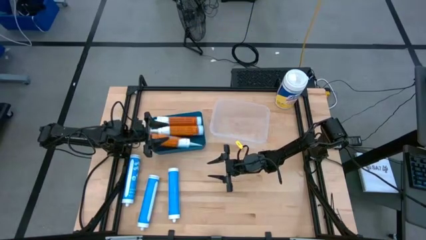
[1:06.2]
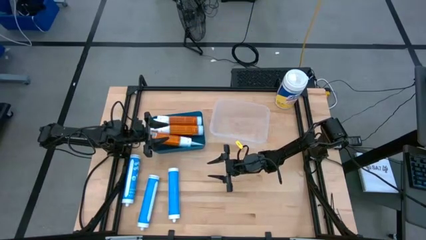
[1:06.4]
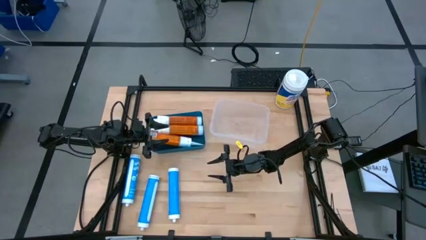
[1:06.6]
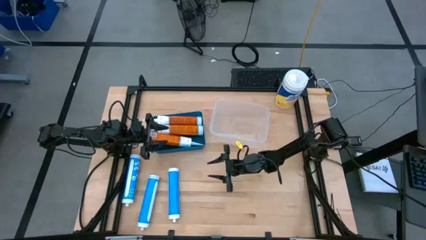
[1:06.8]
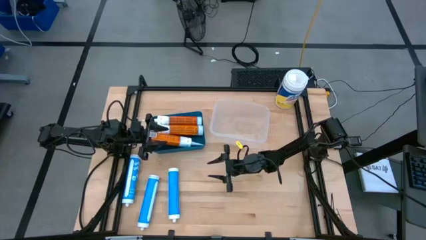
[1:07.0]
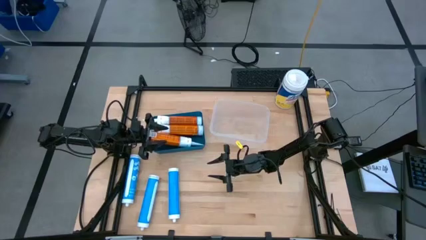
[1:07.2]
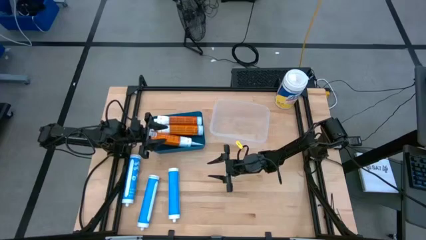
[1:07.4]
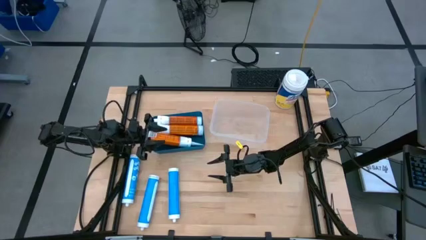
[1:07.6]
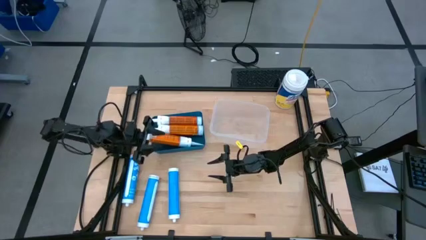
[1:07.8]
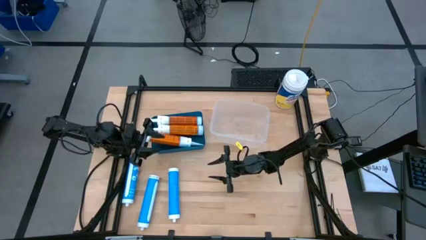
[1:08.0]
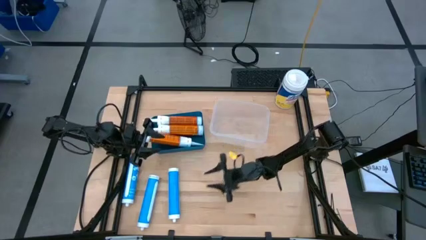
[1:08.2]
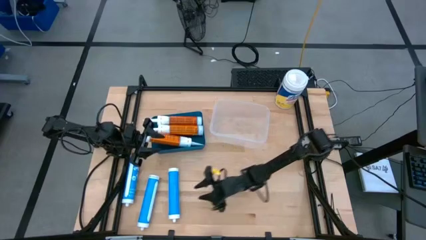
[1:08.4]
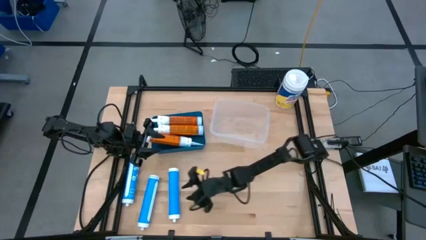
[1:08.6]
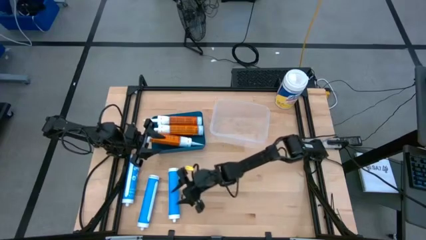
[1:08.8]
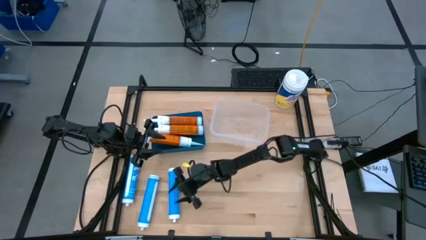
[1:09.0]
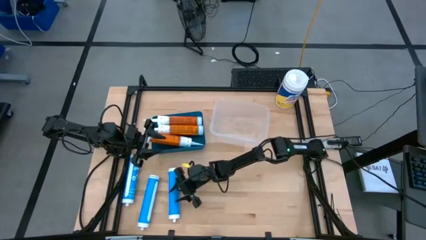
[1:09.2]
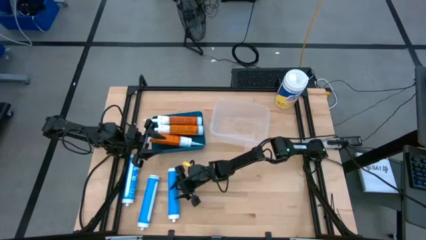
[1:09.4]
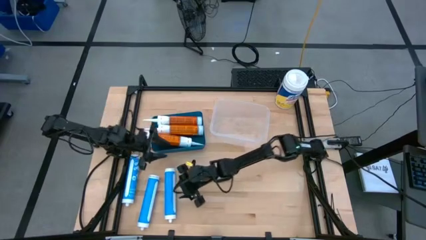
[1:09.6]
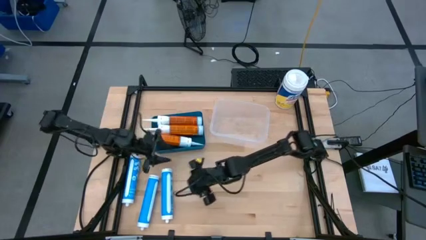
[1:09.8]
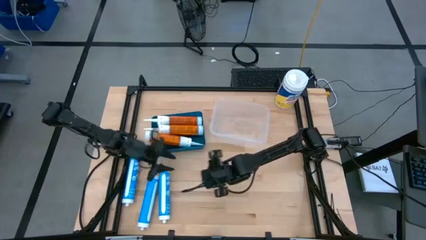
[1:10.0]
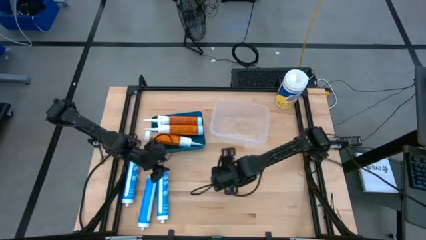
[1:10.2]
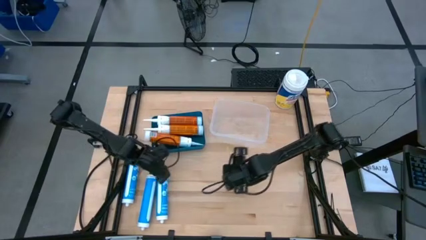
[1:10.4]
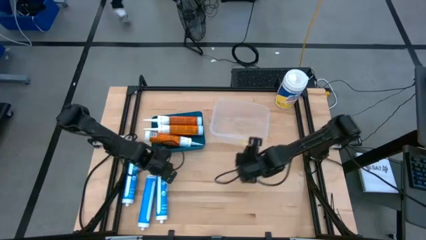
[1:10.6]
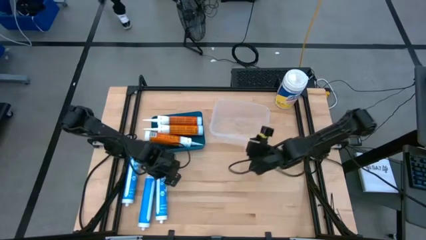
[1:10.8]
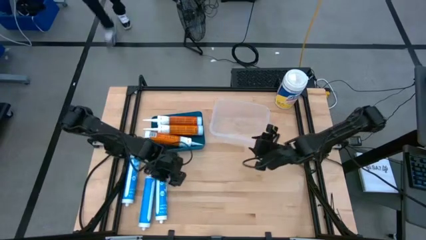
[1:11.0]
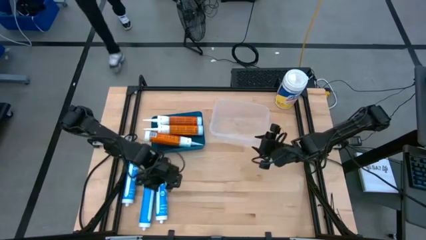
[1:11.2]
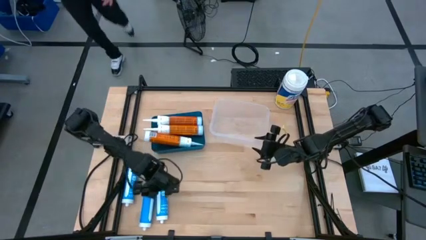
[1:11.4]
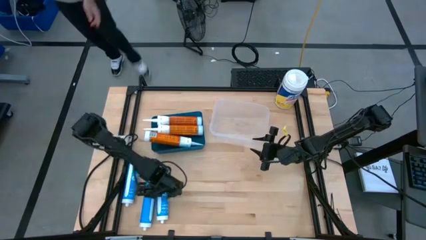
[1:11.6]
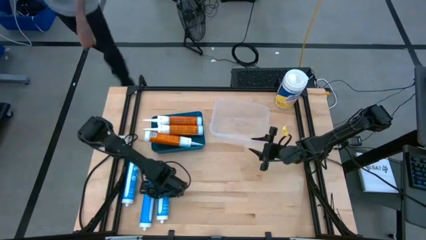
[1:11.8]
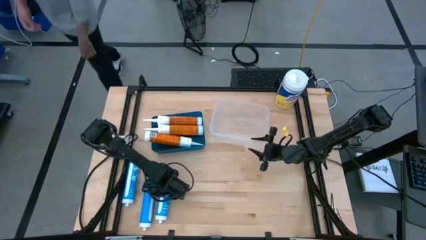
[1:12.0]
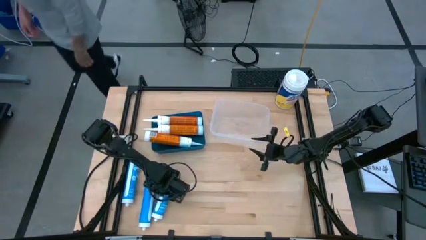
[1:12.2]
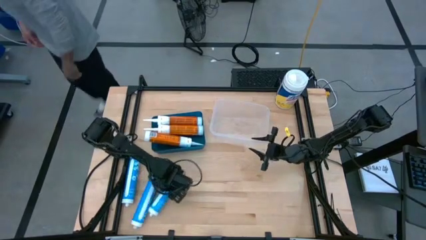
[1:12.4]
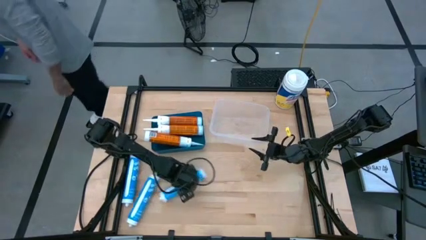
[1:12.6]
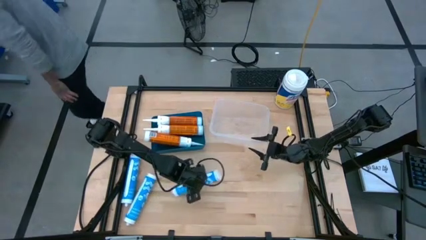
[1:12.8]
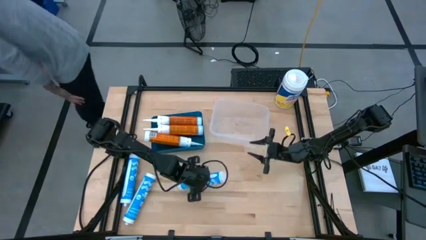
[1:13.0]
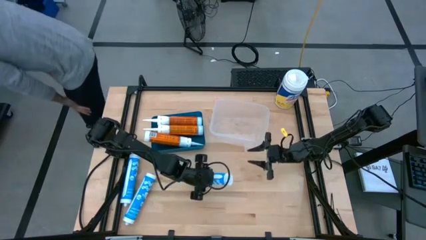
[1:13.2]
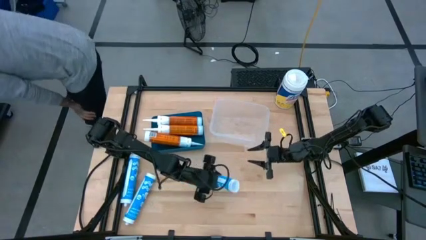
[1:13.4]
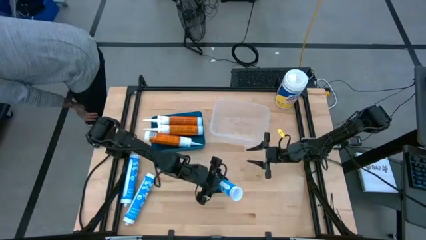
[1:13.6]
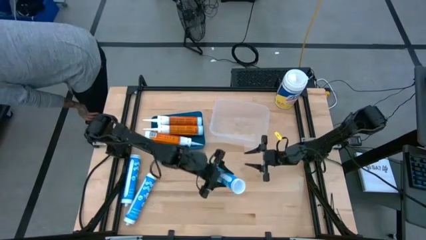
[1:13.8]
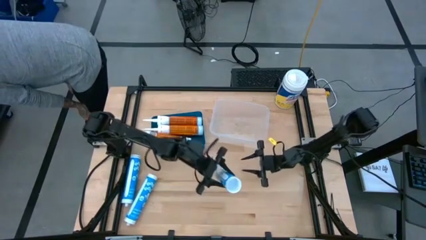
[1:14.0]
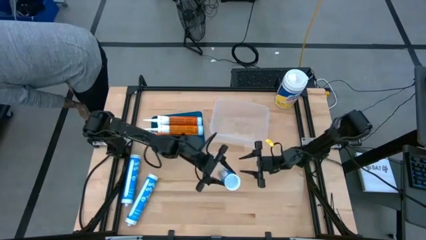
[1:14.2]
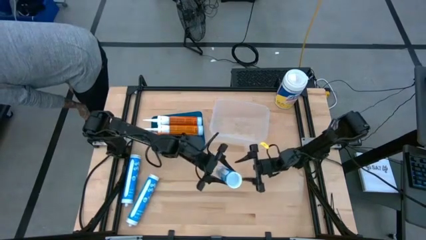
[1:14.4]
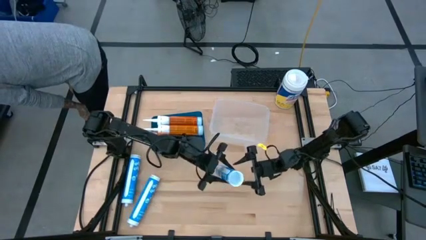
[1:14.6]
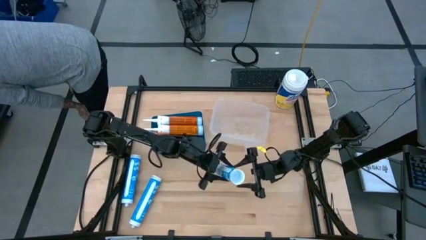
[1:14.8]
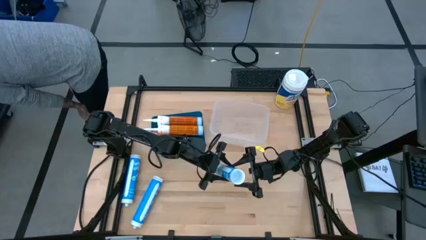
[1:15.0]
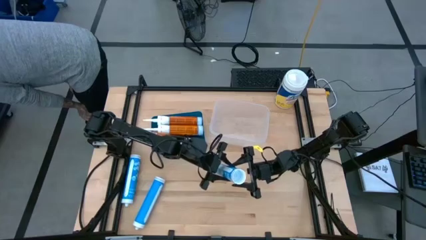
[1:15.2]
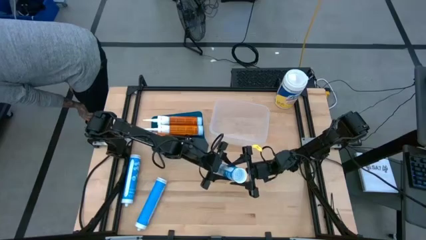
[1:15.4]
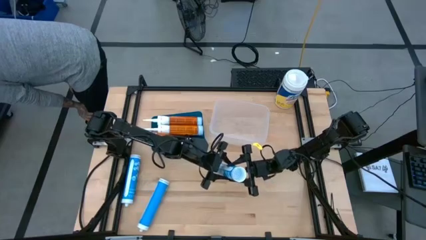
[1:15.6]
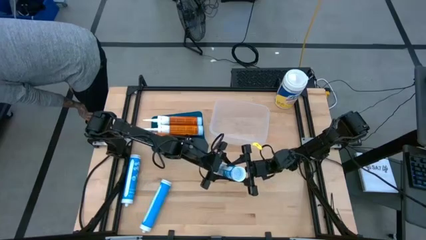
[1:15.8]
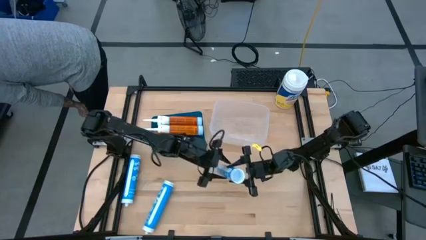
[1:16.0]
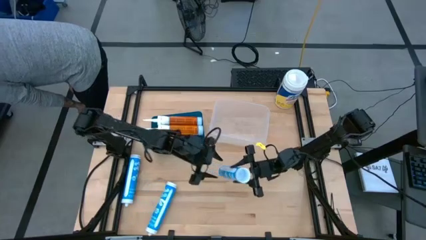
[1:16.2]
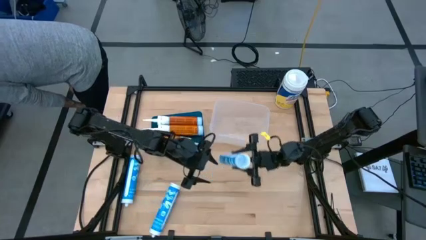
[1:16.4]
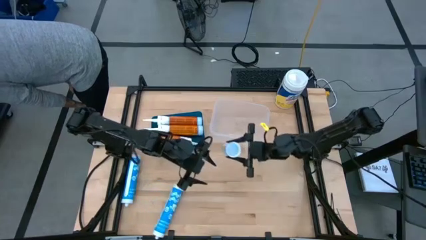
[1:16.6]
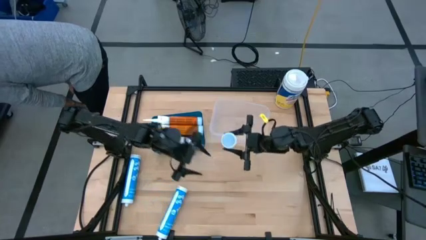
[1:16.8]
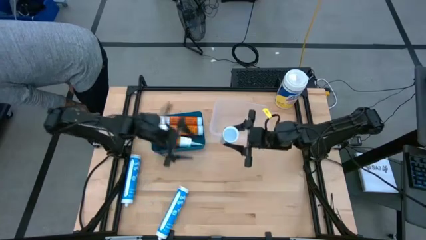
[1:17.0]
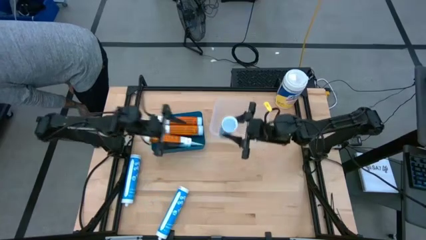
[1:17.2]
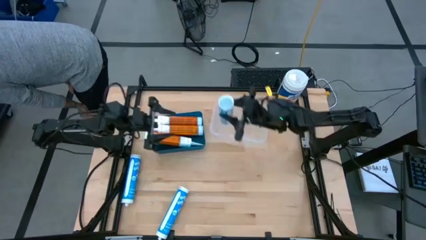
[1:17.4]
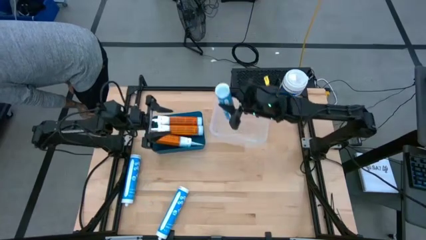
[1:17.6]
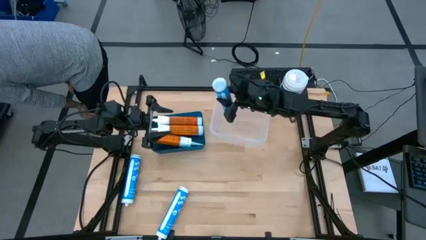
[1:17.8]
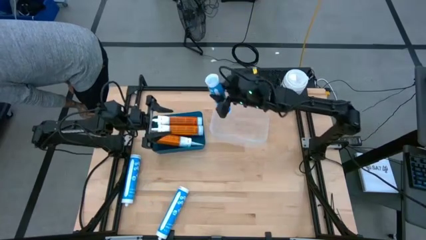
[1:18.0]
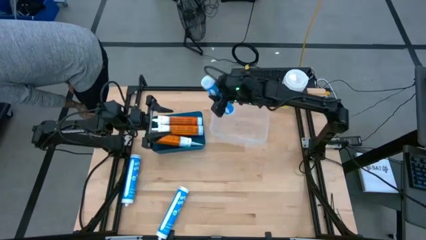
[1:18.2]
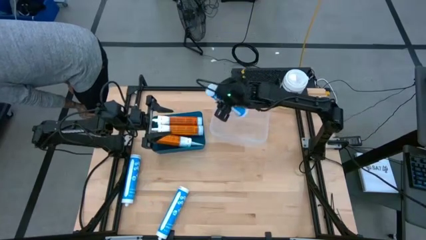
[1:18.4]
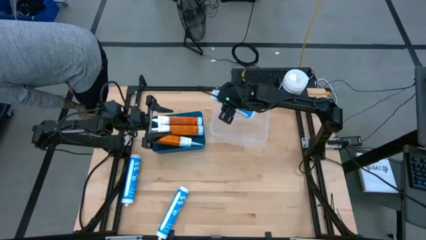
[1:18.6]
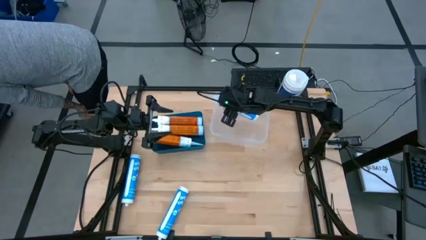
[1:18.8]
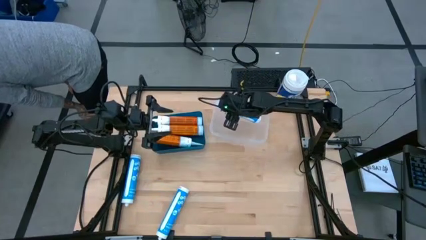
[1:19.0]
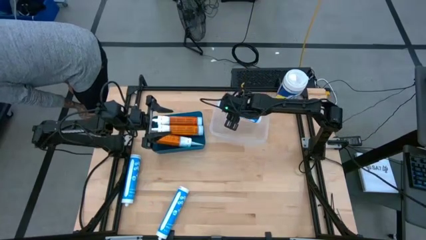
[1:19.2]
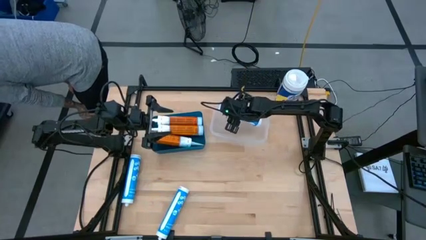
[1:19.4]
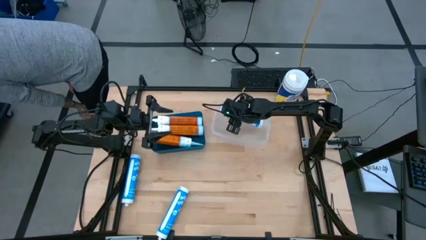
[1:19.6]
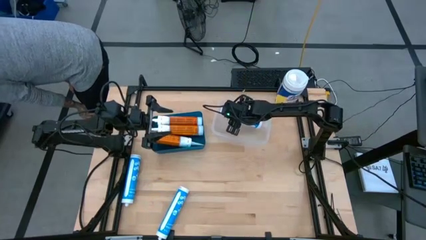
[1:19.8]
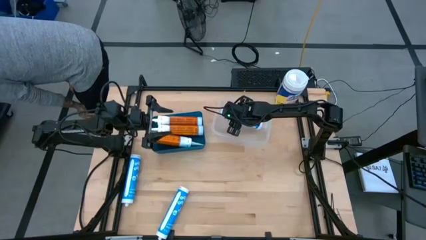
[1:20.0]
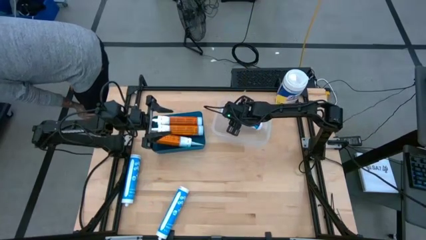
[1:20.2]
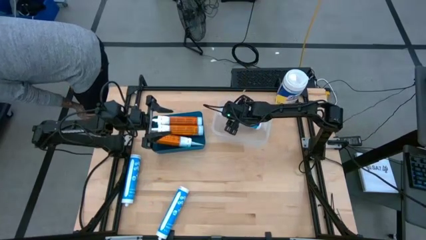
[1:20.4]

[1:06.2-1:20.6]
Task: Pick & place silicon tubes, Sealant and Lysol wipes
Put the right blue sealant into the transparent bin

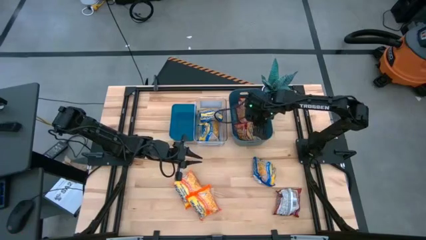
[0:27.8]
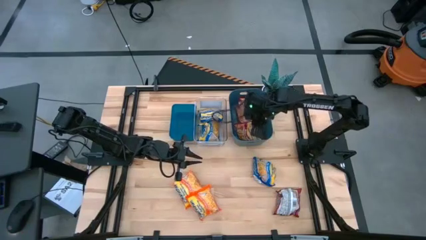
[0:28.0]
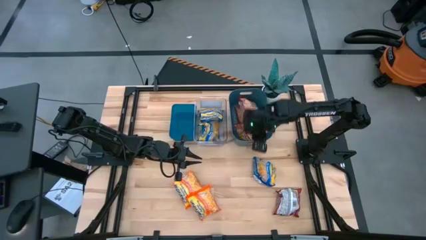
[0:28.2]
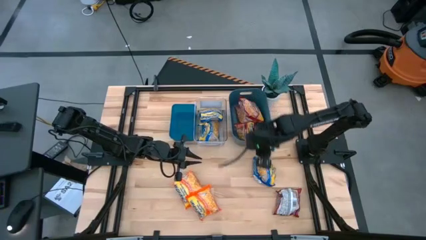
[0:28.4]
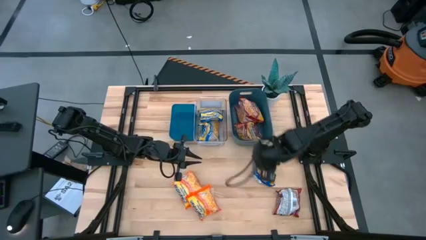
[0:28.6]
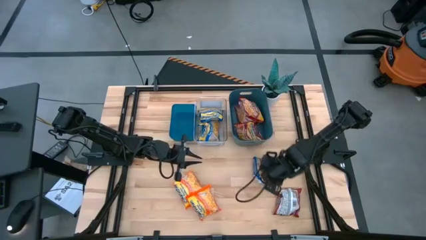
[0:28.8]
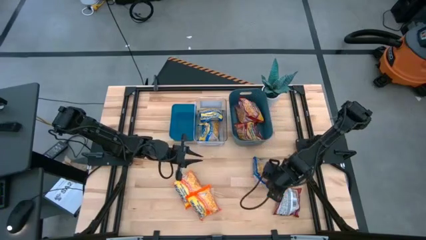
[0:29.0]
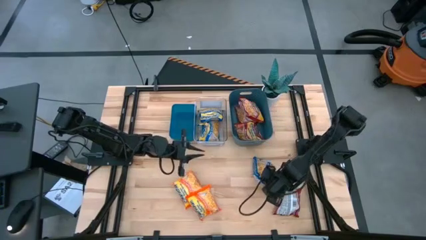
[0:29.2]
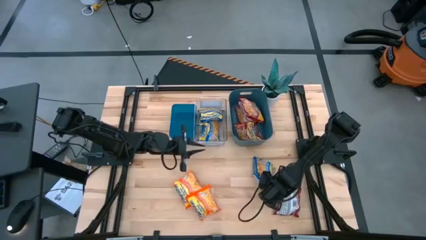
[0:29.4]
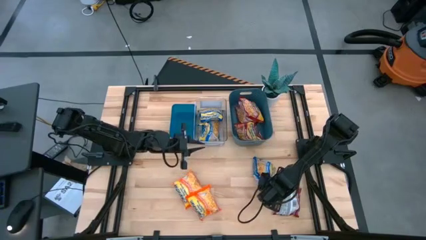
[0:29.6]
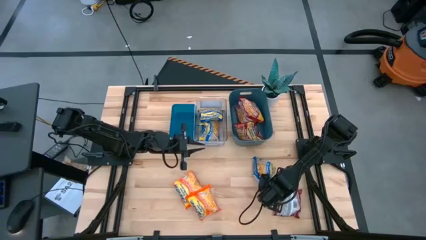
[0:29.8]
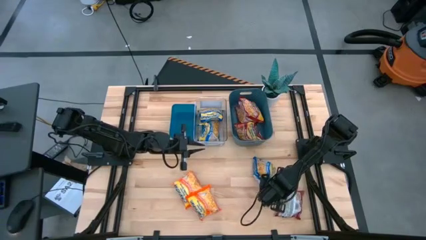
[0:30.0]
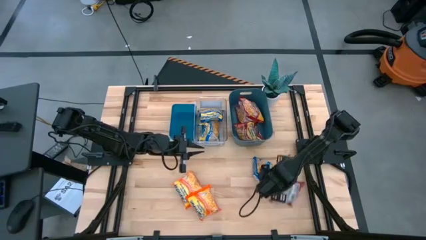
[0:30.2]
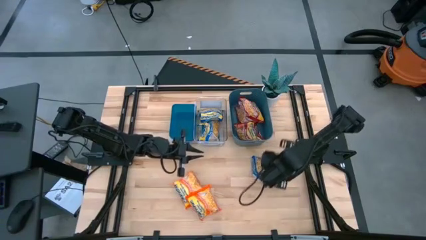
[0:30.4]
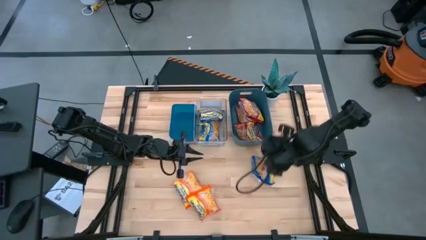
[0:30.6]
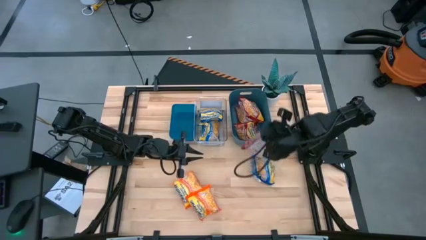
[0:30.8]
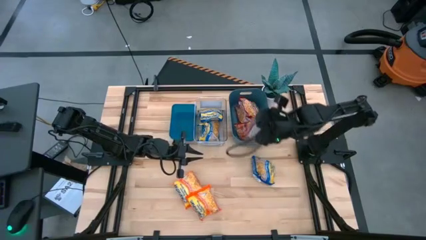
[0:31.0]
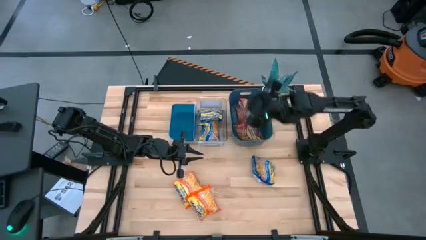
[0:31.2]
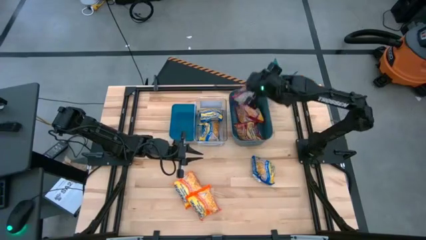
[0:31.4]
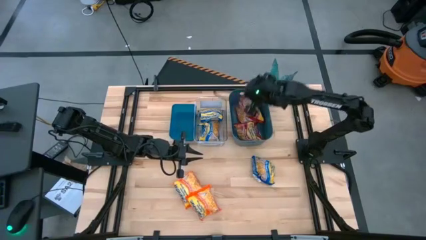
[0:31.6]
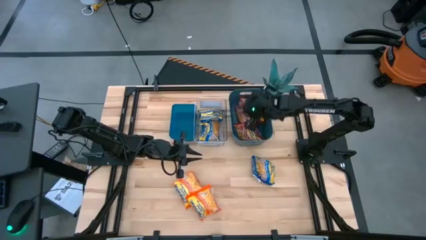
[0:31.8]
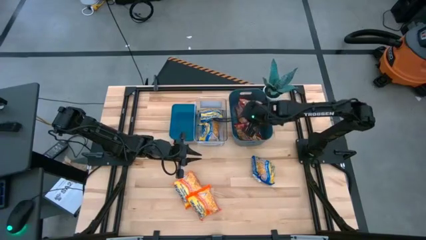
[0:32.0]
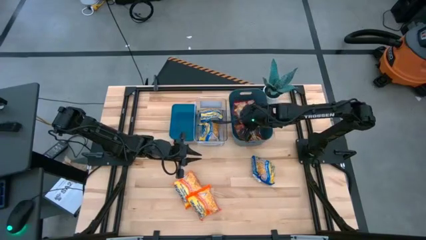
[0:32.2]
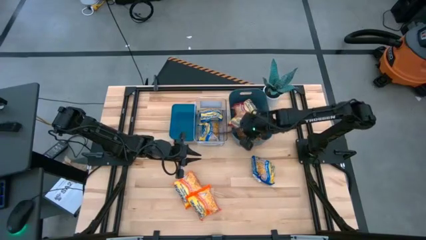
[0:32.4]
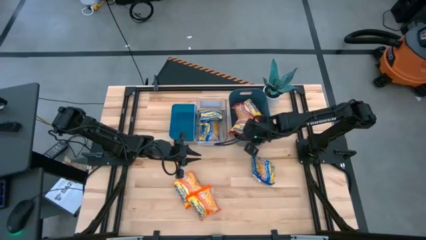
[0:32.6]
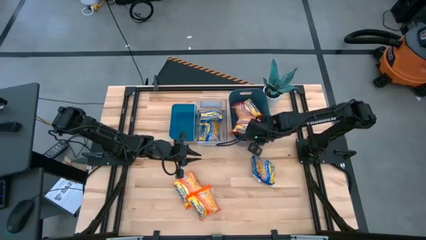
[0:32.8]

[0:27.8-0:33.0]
Task: Sort Maruchan noodles
Put the red noodle pack into the dark blue bin
